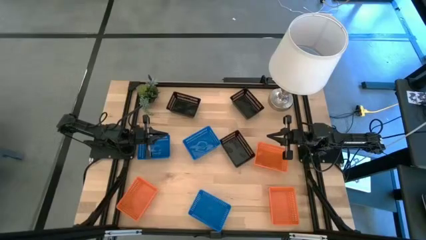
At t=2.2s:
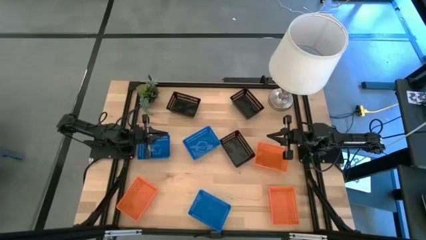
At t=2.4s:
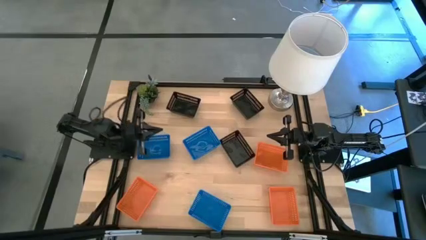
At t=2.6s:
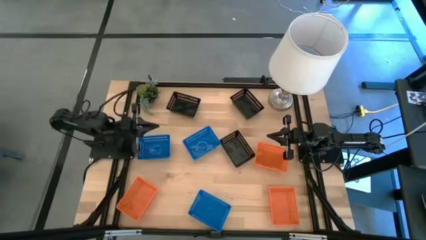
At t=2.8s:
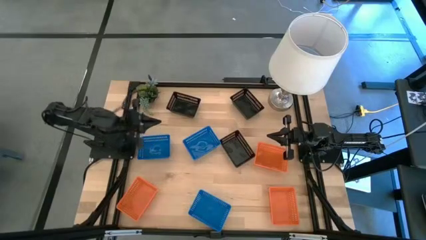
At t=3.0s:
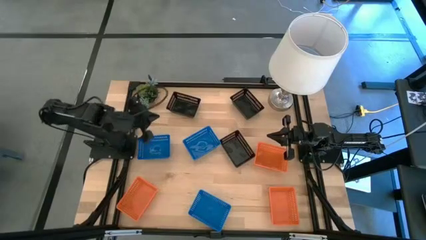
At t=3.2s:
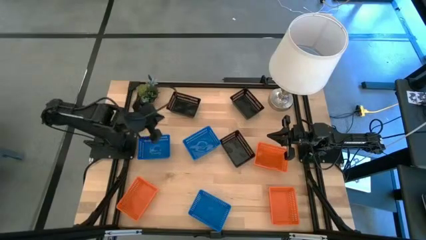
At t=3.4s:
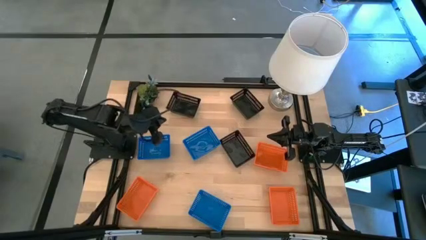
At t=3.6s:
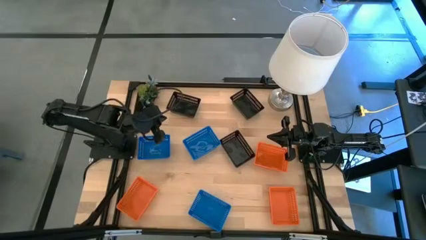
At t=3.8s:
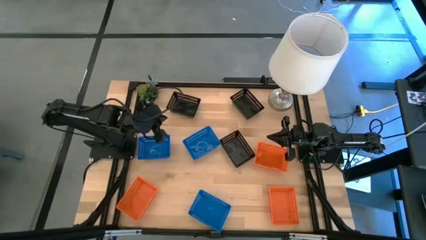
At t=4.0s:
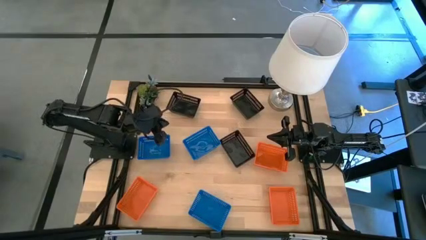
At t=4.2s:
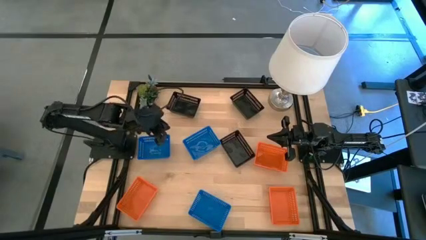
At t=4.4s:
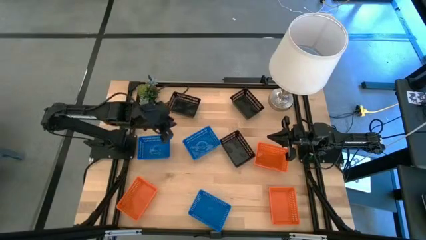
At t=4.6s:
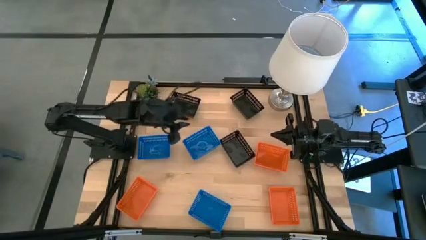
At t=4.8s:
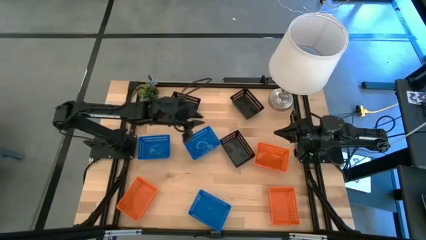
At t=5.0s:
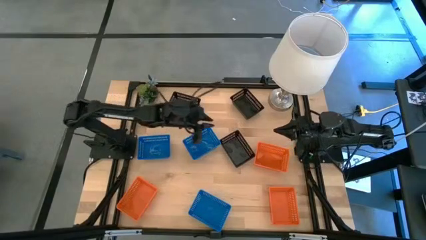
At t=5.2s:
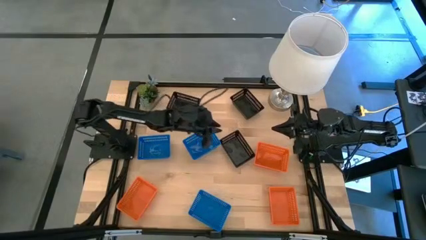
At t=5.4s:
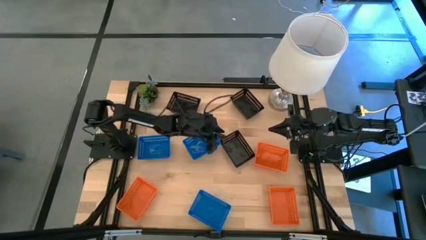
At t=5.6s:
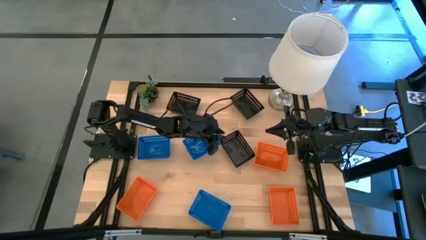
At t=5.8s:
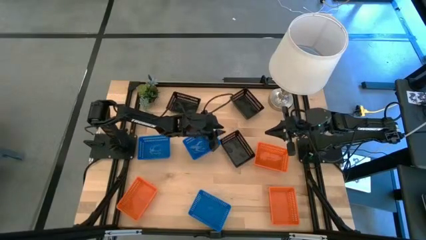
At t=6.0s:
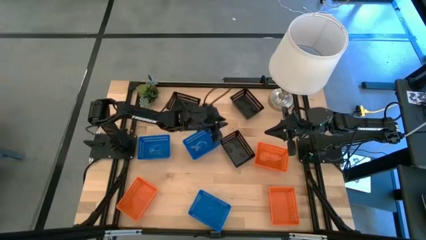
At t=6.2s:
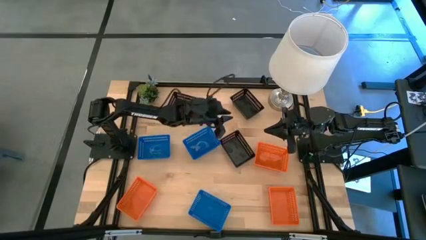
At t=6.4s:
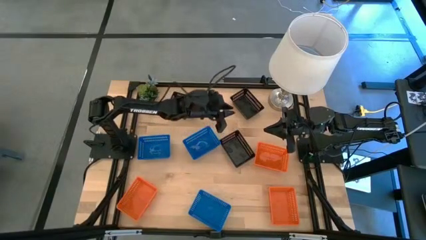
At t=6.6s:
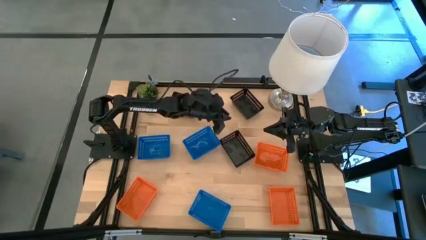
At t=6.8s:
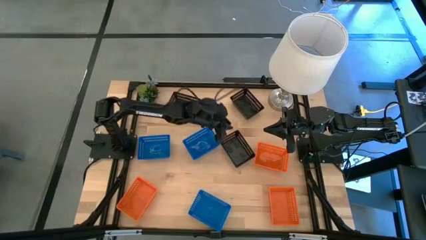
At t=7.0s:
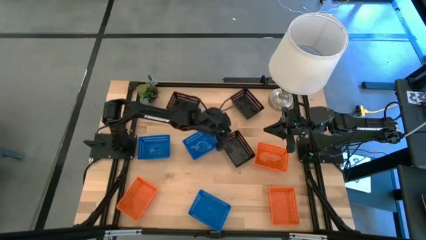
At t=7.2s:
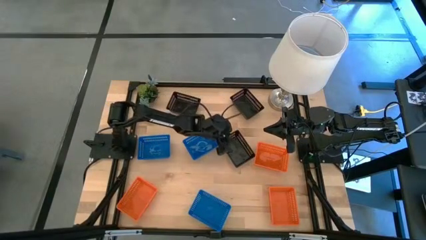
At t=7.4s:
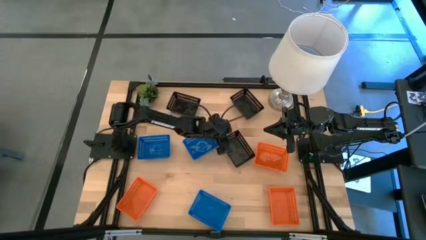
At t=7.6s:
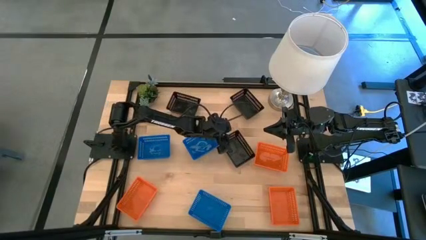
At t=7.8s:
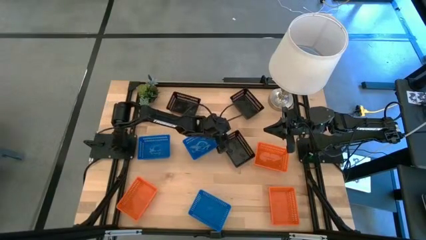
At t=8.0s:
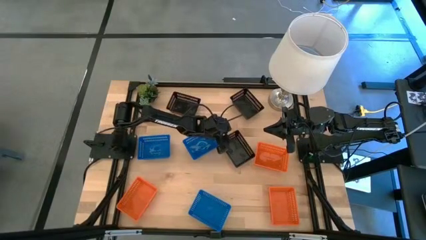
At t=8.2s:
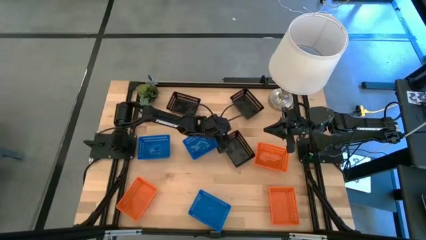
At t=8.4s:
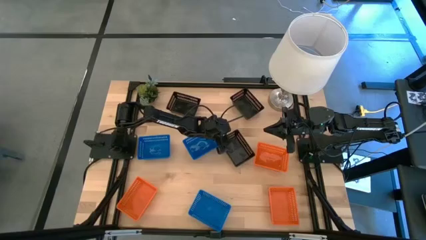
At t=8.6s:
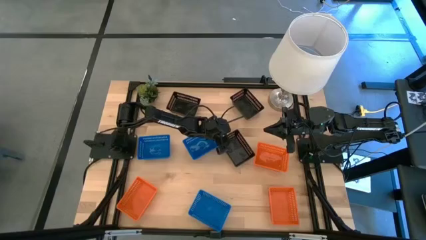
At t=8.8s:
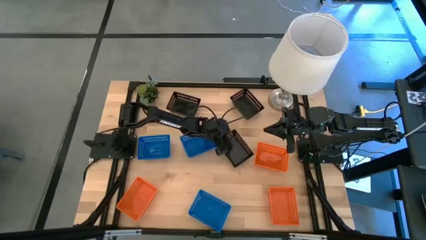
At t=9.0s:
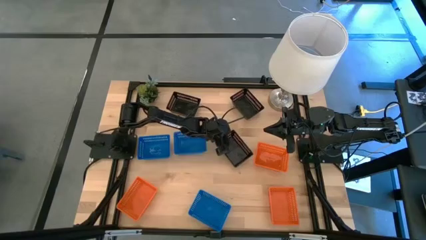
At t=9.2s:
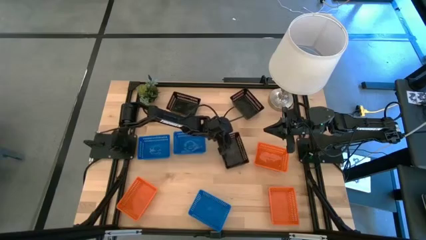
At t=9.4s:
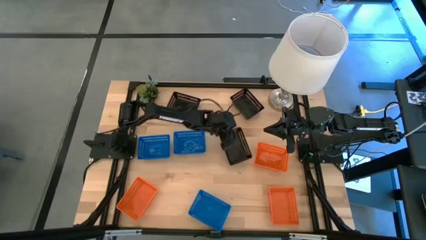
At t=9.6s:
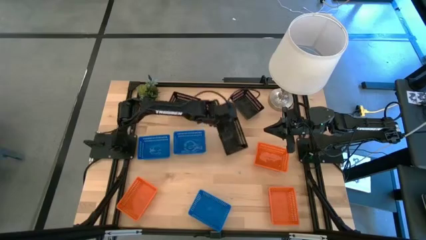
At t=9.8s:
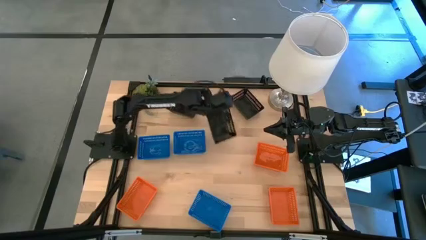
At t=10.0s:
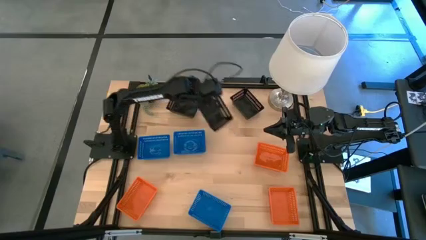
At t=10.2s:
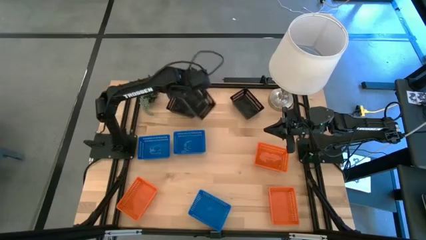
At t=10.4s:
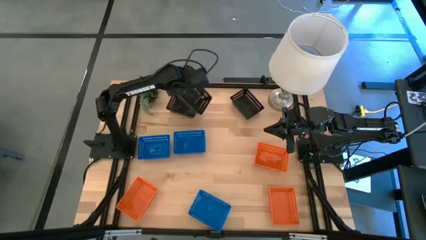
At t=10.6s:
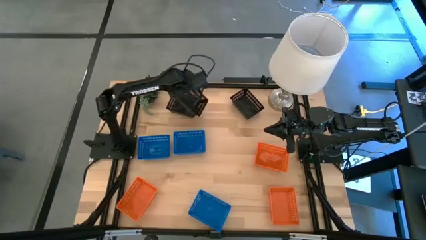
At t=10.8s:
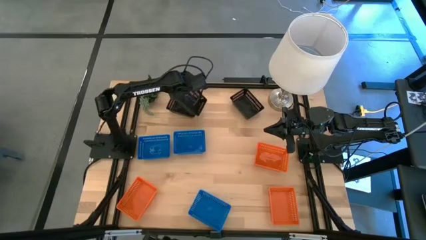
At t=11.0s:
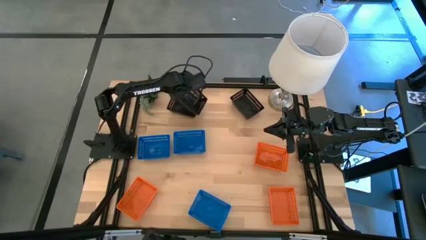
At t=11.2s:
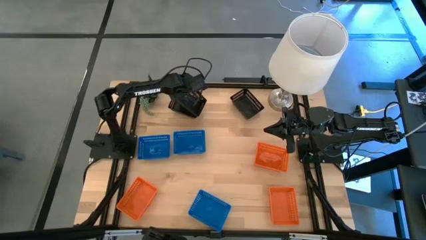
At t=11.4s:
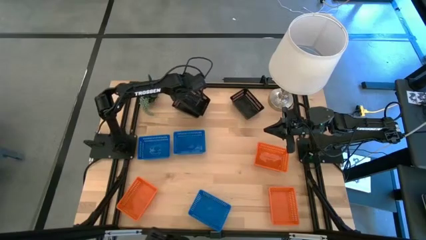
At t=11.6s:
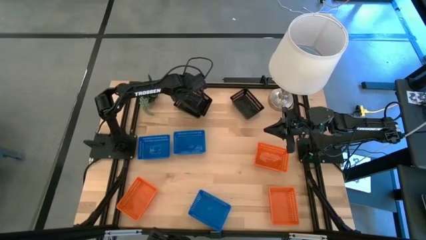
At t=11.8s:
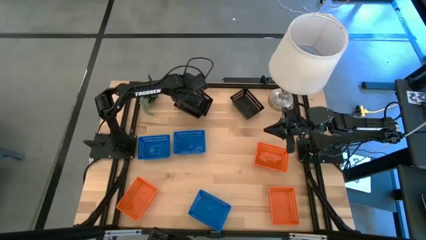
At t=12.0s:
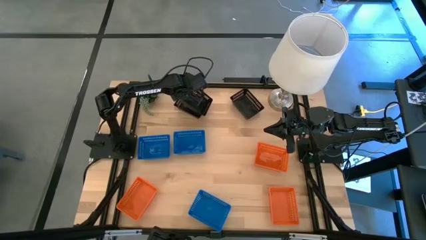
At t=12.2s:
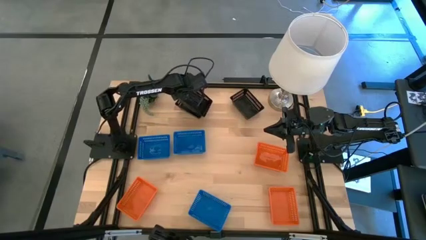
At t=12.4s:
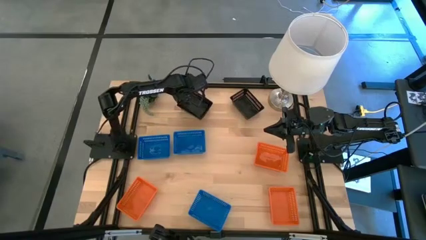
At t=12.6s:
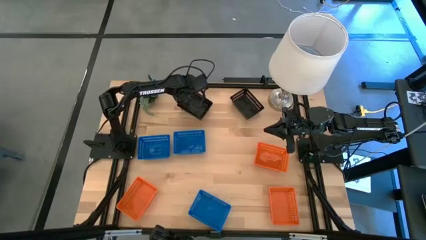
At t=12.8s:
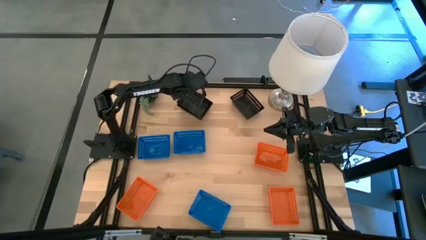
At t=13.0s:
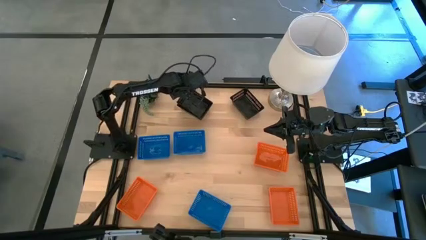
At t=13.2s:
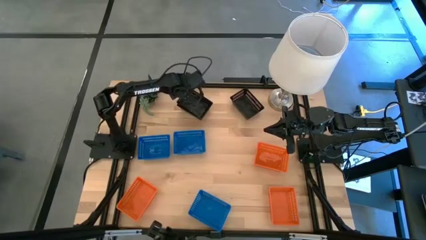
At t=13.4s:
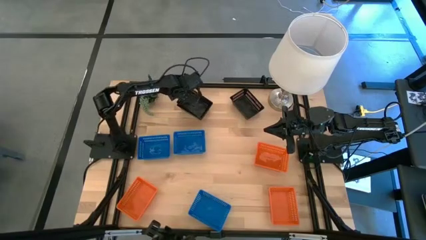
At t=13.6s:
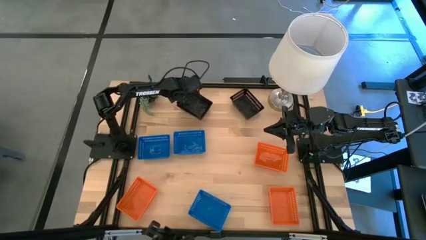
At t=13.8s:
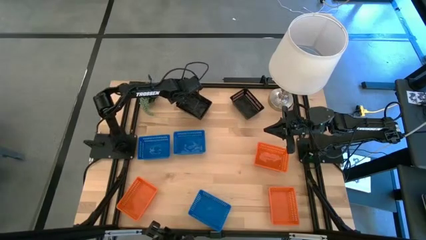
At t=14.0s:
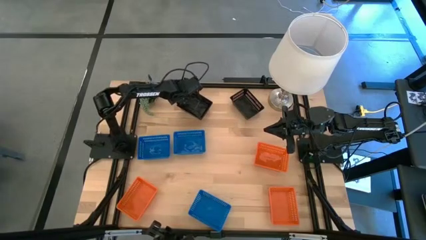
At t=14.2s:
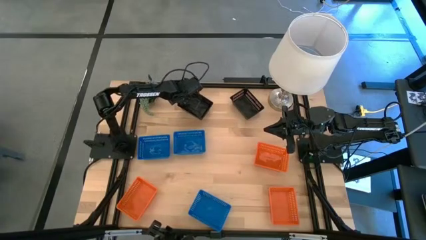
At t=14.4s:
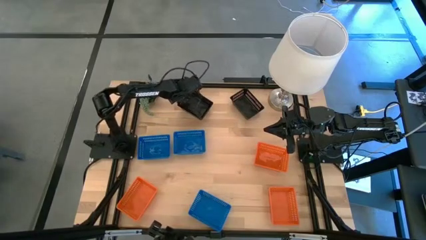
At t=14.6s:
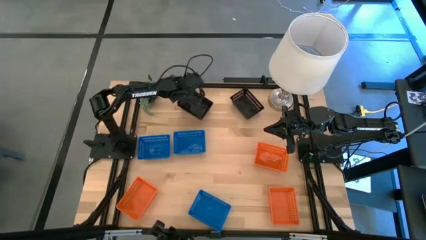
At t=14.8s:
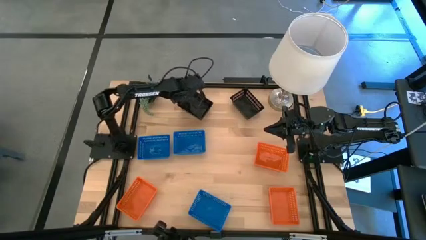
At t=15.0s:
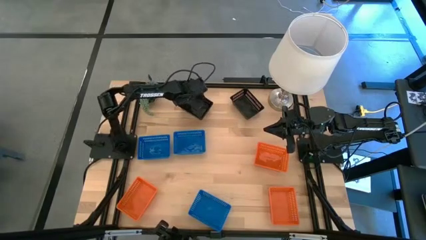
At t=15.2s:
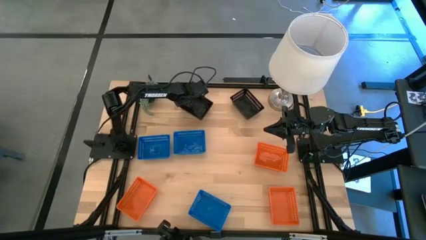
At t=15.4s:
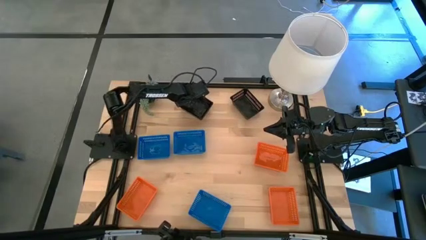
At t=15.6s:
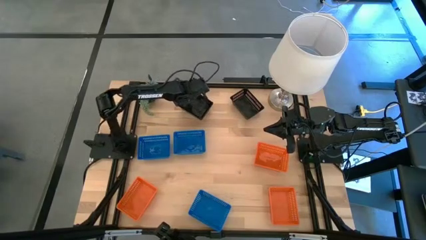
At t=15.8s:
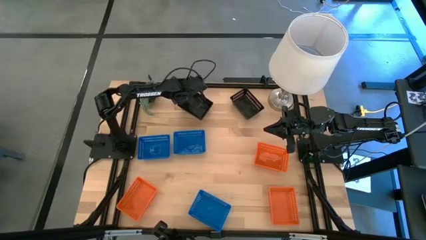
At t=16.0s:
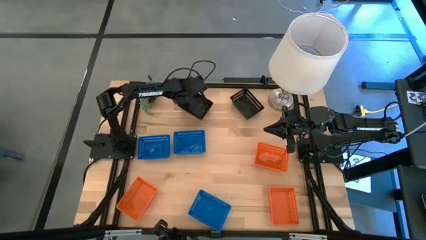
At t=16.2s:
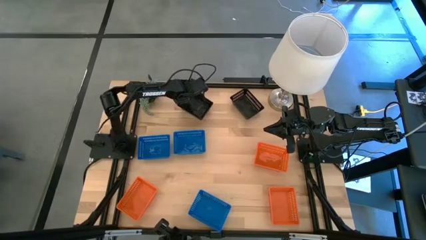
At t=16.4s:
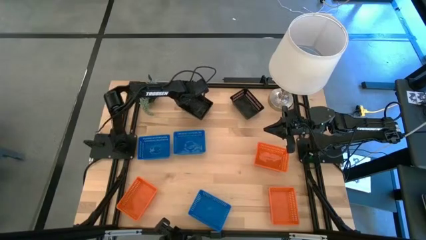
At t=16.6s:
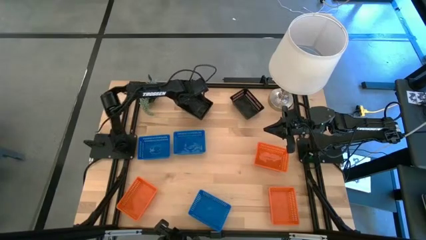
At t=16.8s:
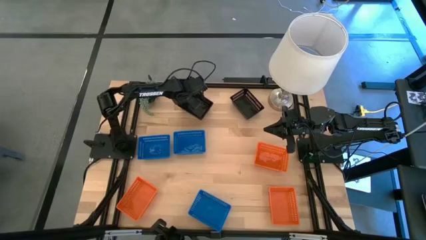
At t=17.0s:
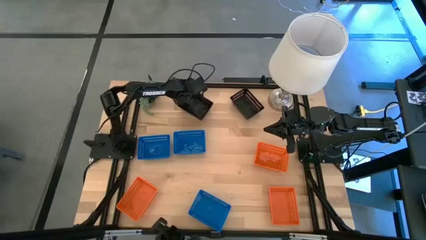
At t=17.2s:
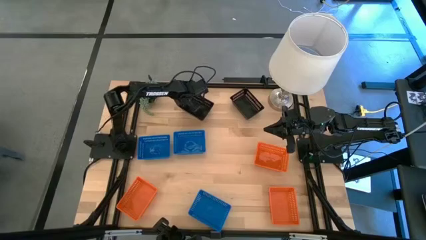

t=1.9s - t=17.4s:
Stack the bottom black bin on the top left black bin
